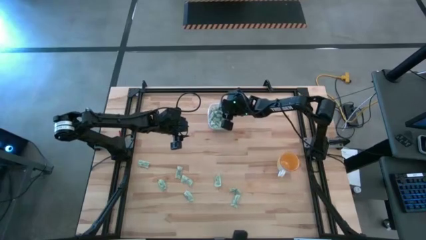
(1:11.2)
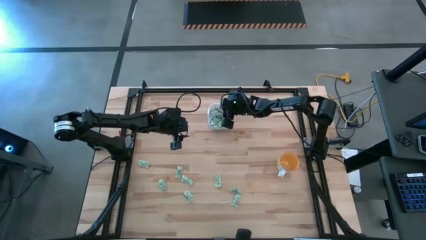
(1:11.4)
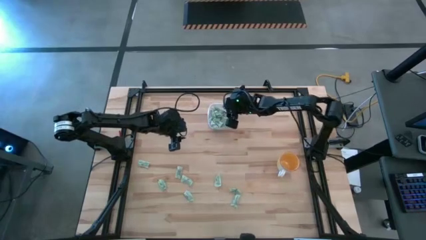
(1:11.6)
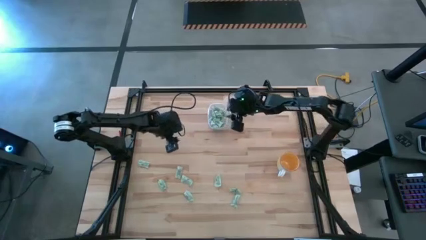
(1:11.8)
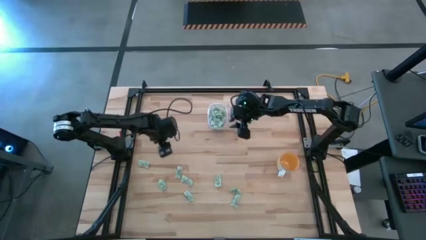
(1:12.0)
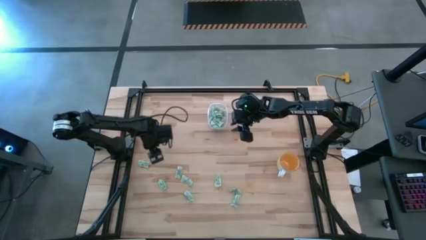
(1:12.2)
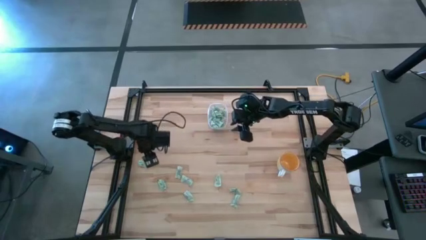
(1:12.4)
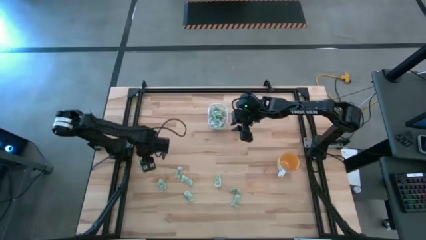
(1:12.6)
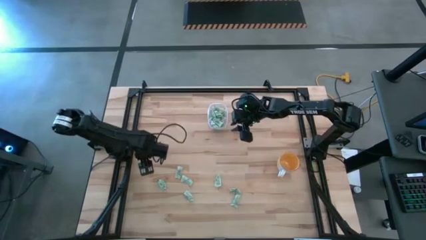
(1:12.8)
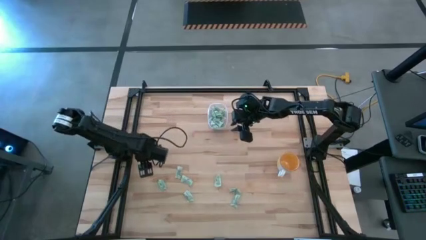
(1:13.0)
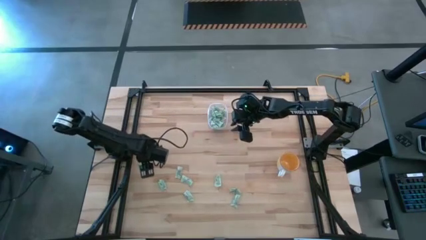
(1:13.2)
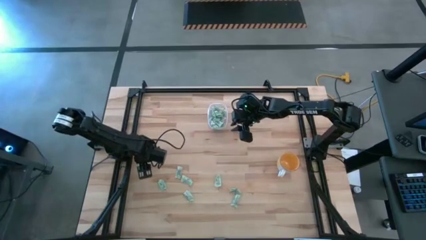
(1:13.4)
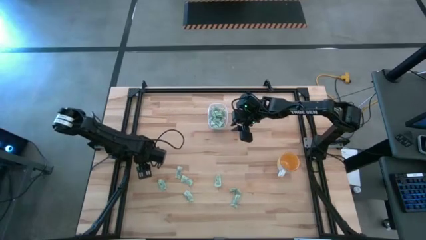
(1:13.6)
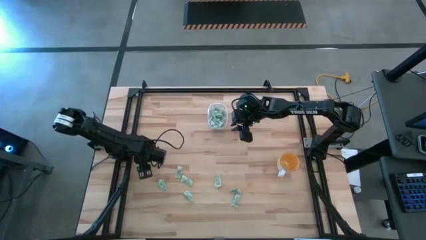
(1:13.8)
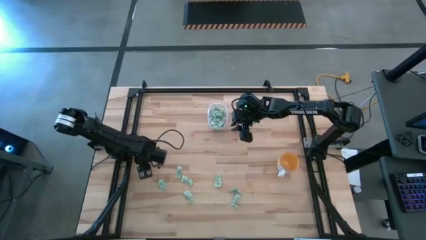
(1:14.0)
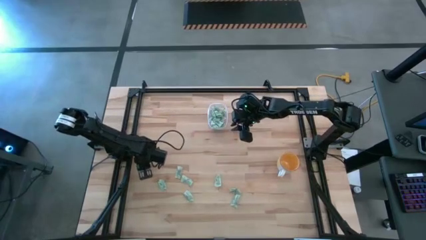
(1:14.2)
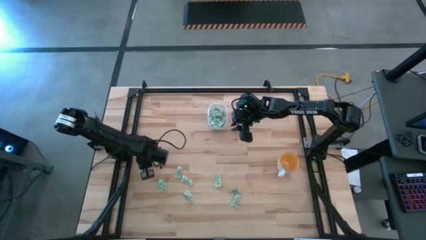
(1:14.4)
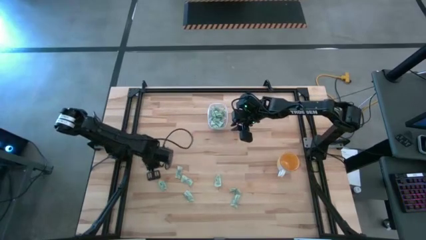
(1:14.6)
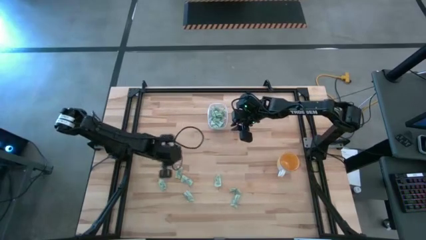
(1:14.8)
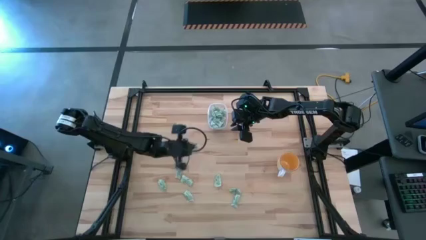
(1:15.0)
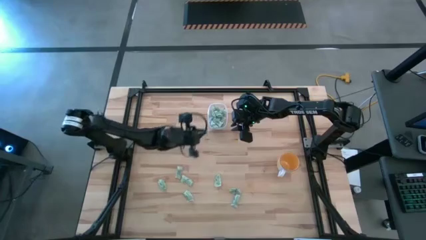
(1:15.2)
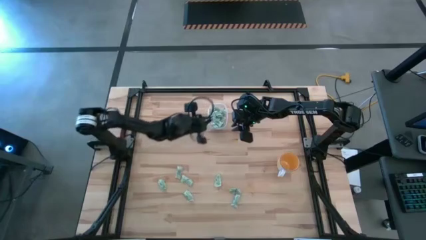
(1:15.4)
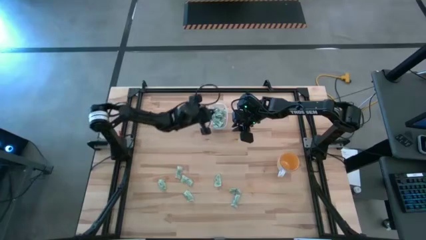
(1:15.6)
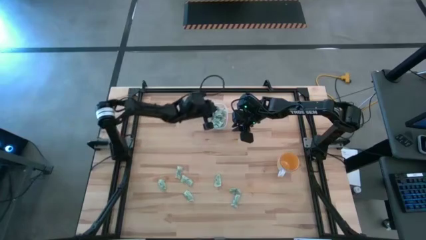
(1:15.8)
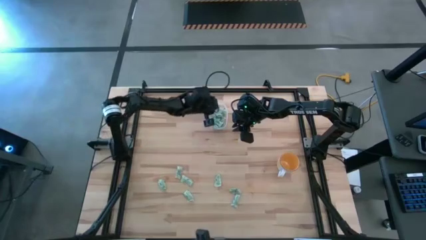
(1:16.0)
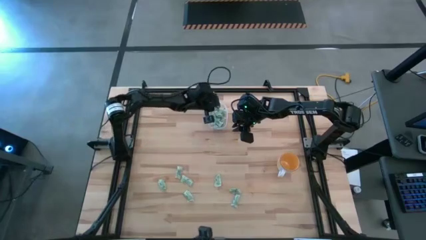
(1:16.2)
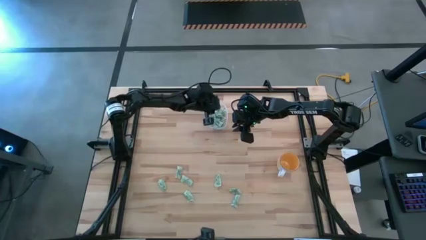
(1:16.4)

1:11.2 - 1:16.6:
Task: Pick and place Stevia / Truvia into bins
Put the green stevia packet into the transparent bin

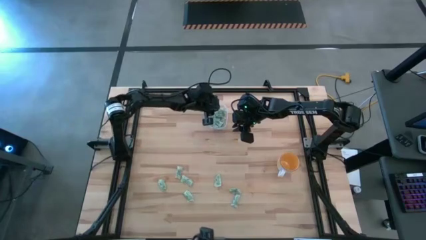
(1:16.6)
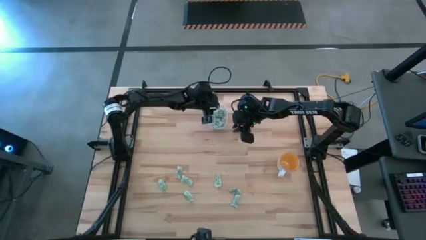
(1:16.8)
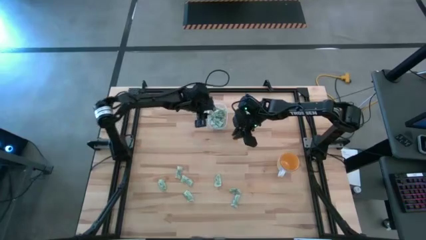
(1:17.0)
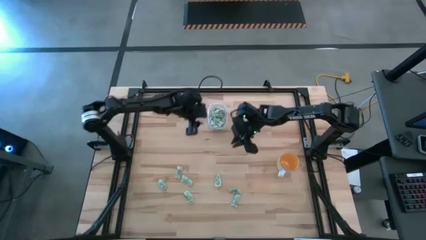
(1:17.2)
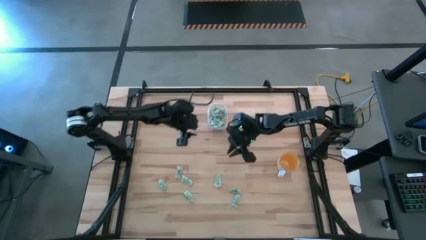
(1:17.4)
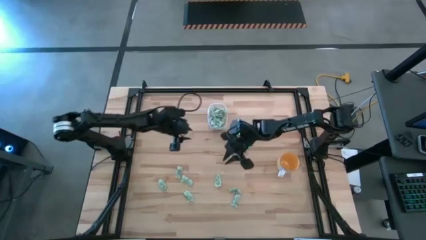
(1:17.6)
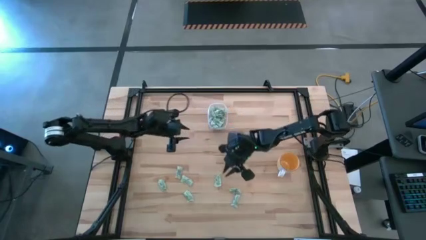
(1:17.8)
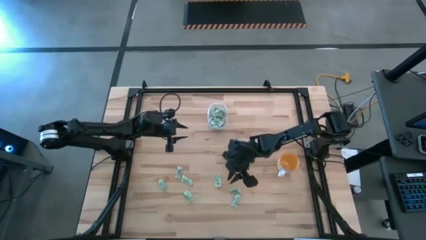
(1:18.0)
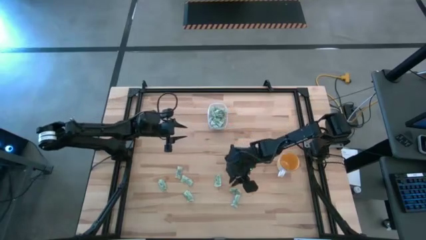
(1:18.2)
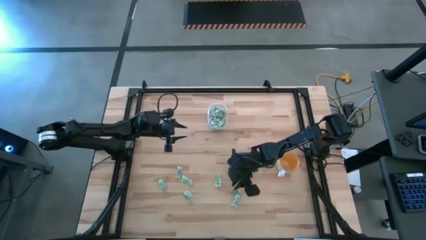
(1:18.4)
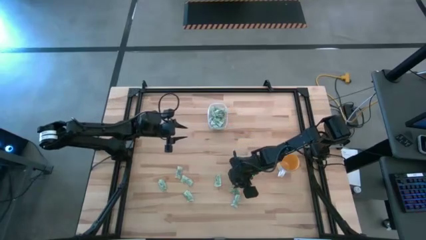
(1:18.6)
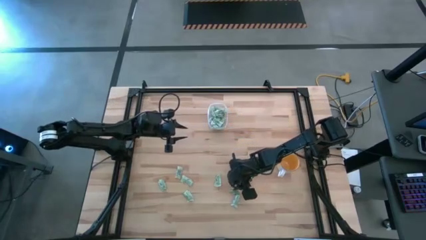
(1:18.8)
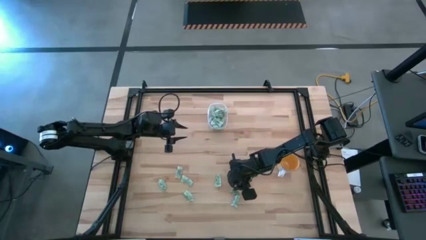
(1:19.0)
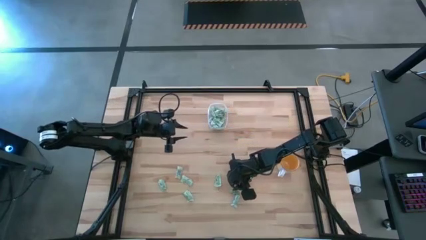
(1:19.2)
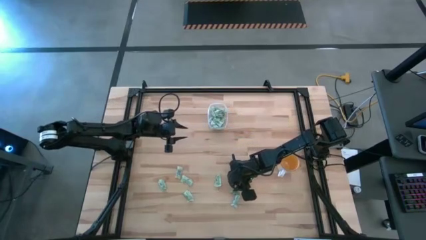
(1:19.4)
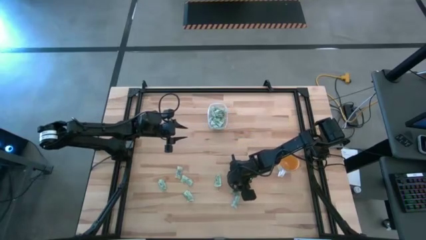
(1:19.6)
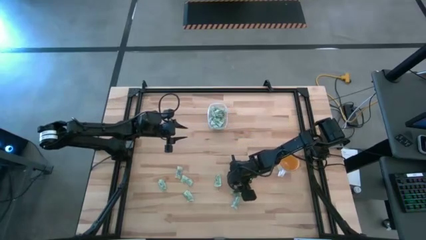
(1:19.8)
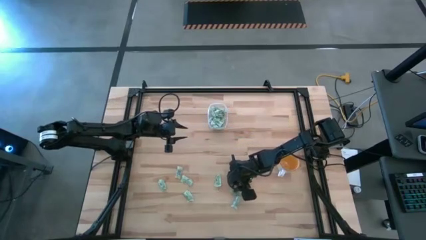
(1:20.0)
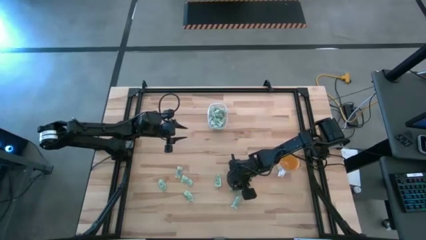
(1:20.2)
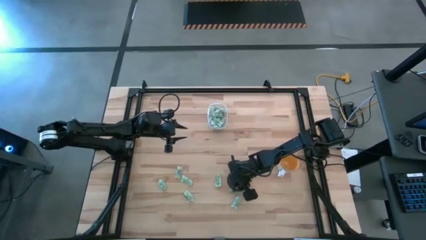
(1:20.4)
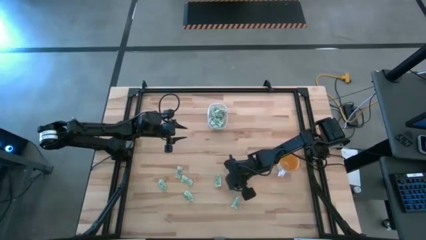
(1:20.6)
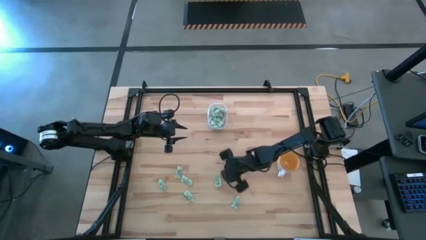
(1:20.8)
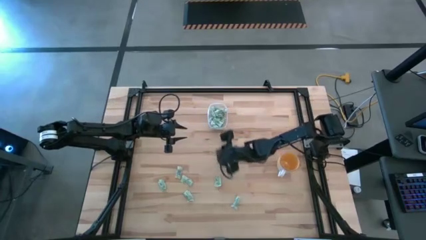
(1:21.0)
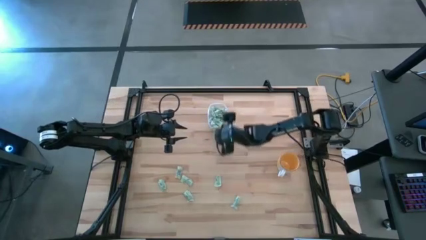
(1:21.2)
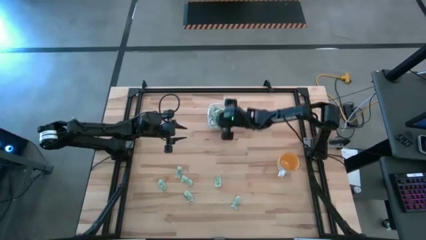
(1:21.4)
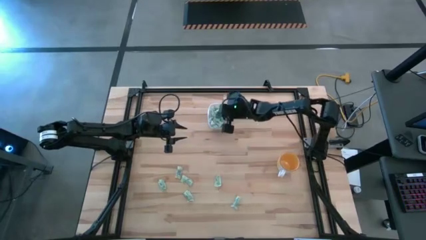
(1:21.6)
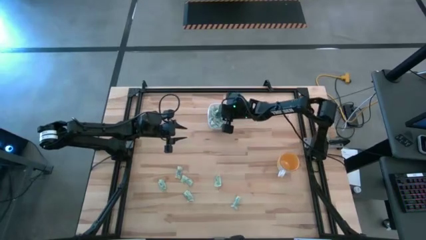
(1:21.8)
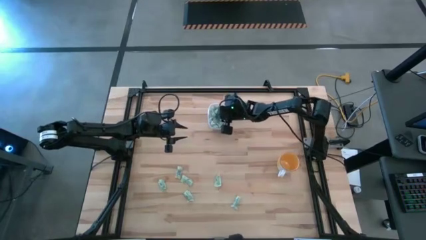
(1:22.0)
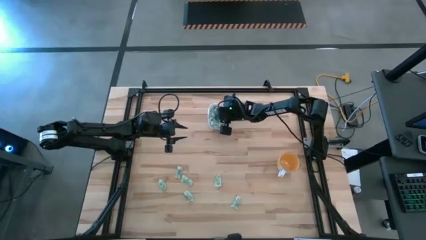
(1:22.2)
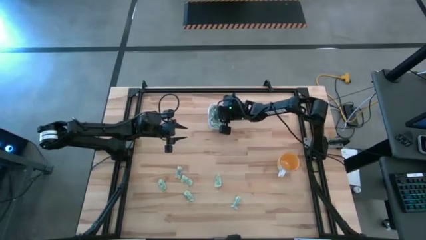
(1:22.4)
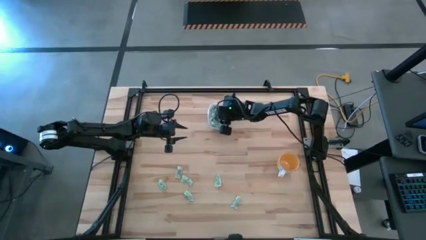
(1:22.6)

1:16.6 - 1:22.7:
Put the green stevia packet into the transparent bin

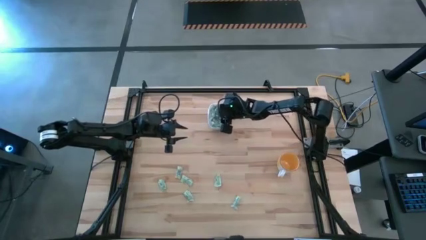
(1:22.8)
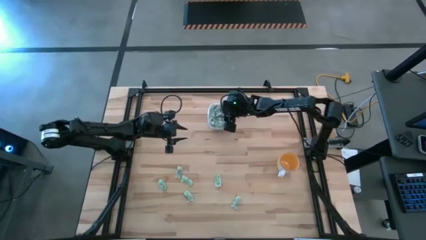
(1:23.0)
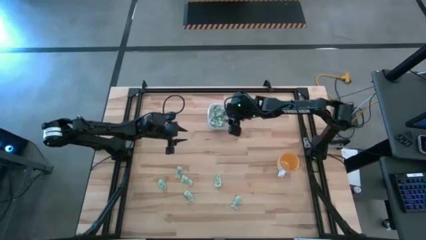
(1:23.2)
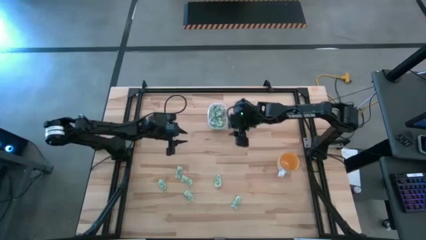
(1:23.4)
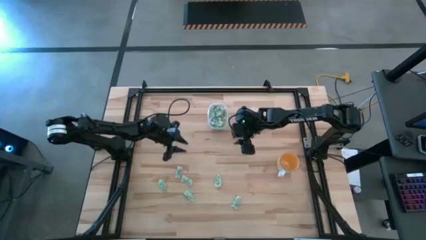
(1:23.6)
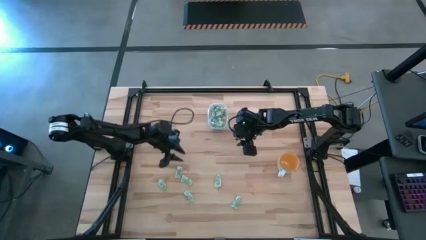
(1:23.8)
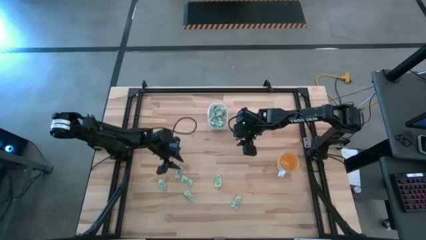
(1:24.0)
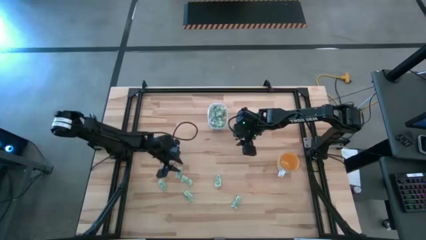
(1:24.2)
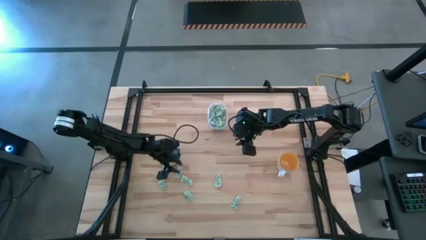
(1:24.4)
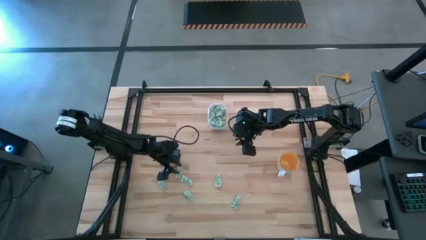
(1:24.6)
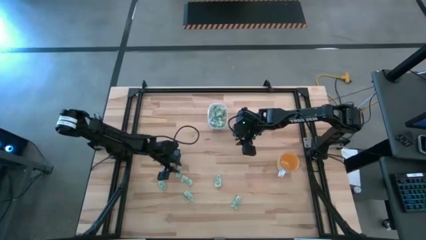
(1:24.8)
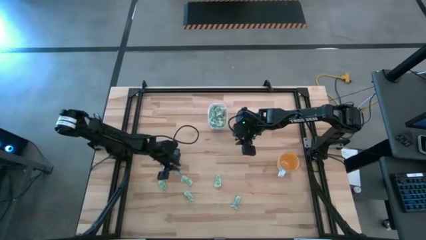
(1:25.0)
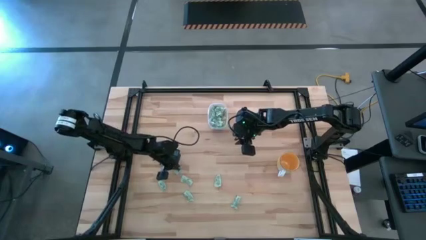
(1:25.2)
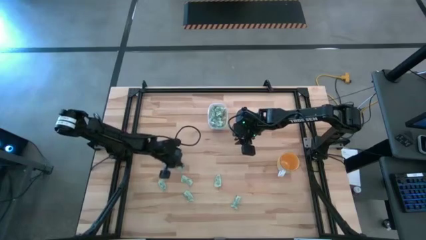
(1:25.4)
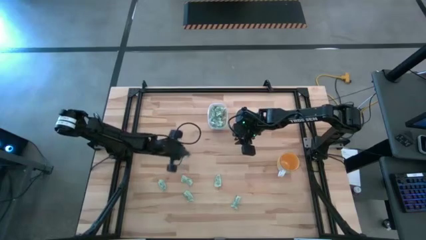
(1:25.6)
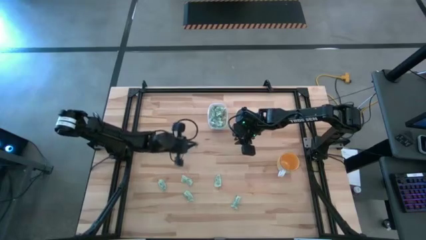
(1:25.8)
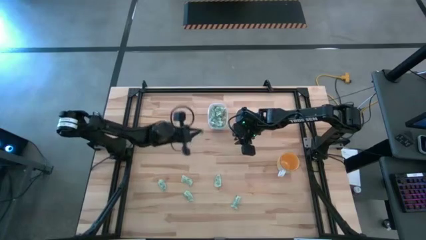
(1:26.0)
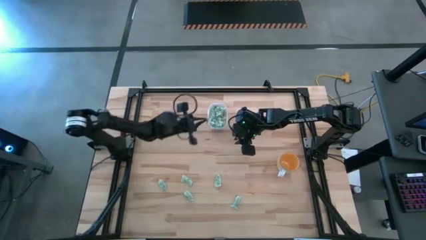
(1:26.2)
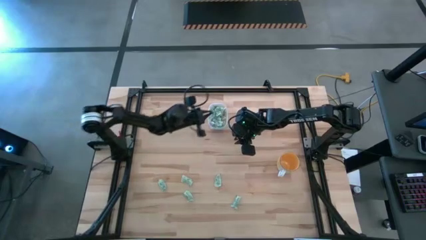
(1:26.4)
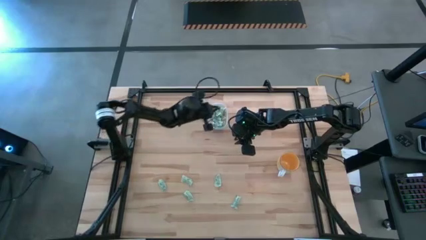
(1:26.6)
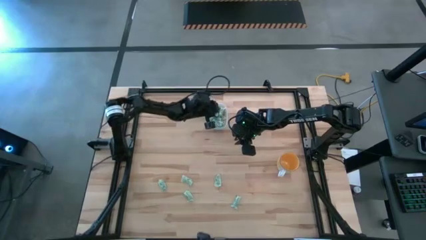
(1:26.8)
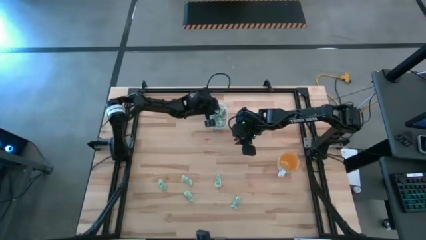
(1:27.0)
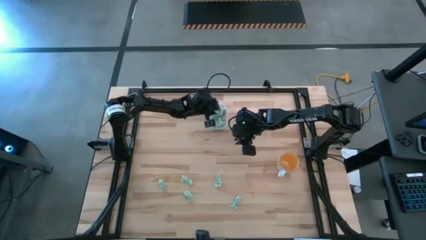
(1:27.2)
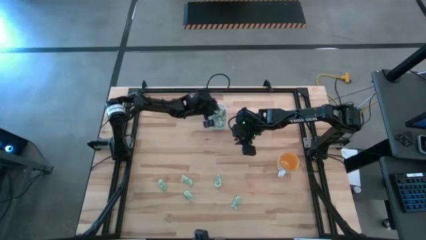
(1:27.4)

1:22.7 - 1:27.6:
Put the green stevia packet into the transparent bin
